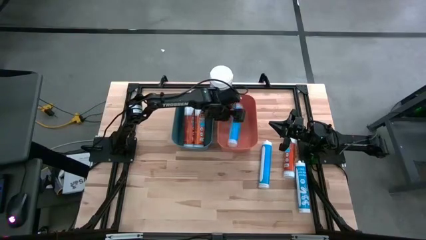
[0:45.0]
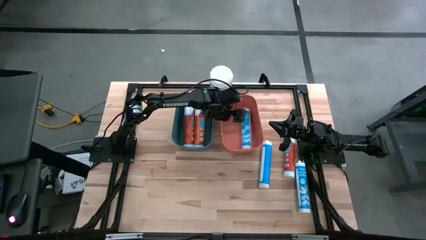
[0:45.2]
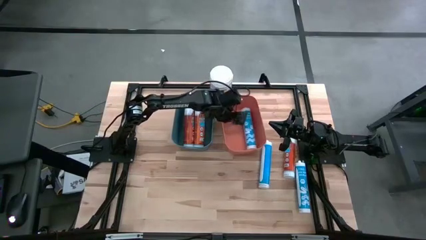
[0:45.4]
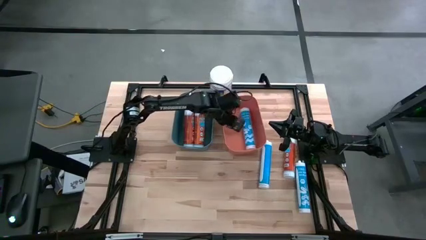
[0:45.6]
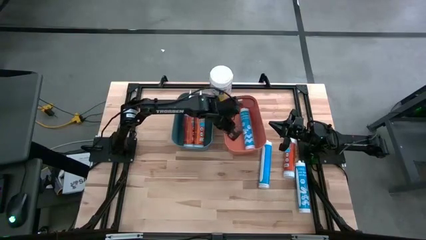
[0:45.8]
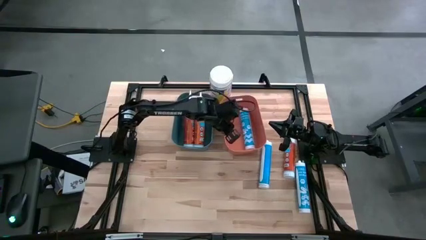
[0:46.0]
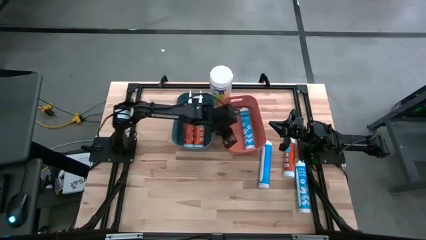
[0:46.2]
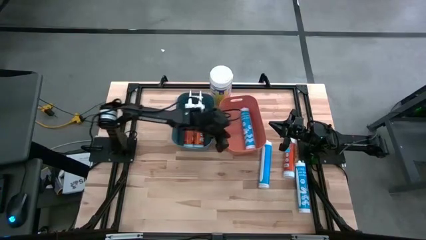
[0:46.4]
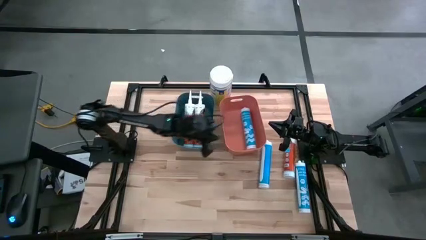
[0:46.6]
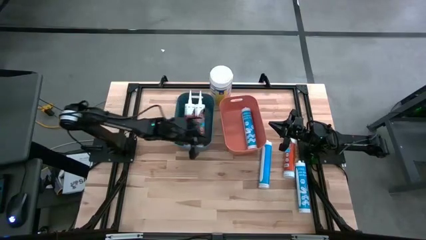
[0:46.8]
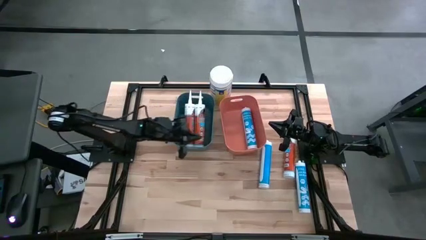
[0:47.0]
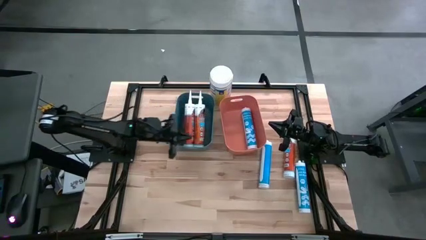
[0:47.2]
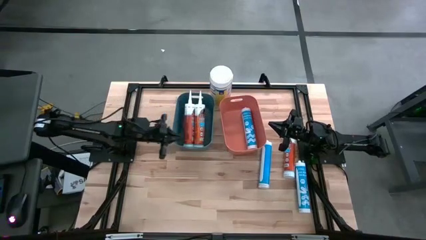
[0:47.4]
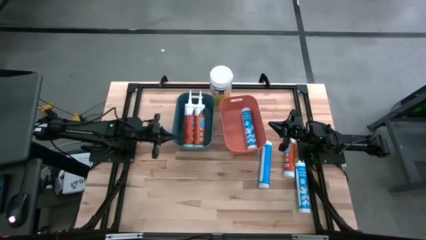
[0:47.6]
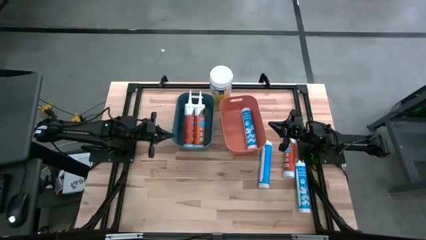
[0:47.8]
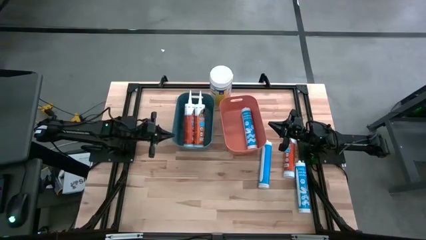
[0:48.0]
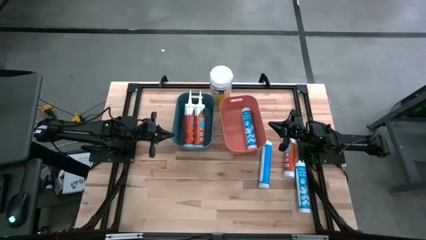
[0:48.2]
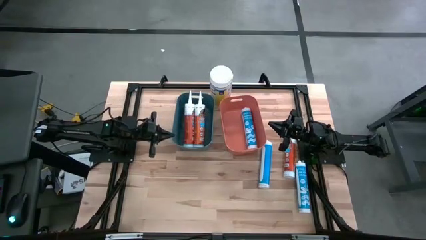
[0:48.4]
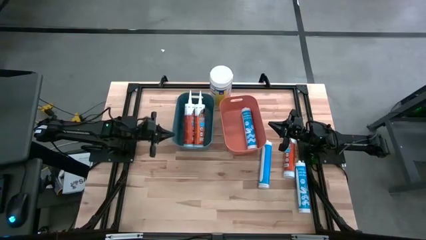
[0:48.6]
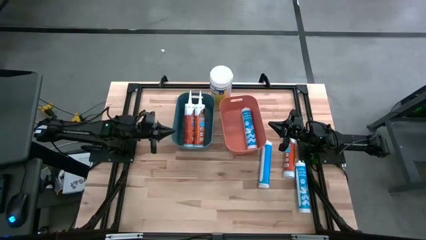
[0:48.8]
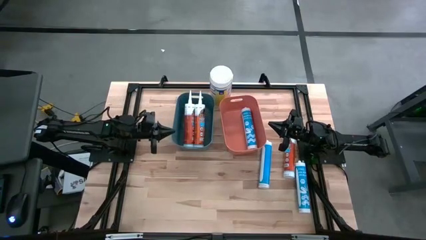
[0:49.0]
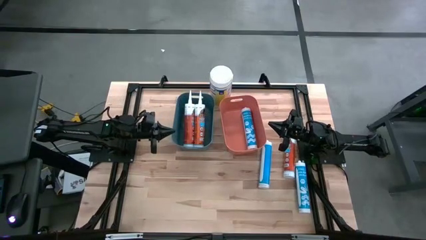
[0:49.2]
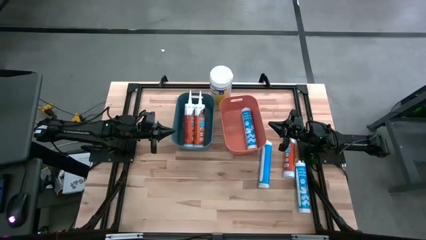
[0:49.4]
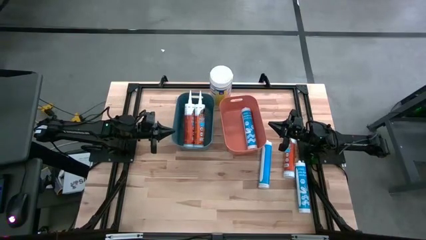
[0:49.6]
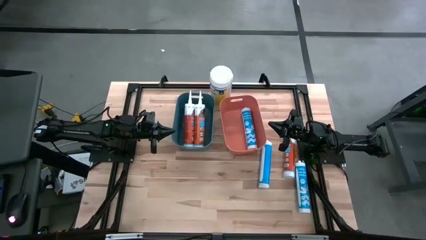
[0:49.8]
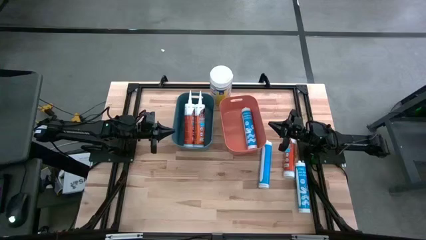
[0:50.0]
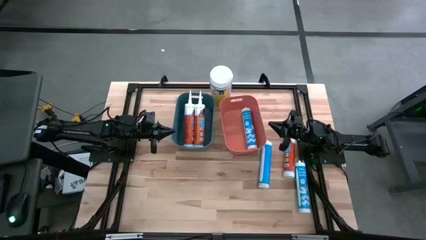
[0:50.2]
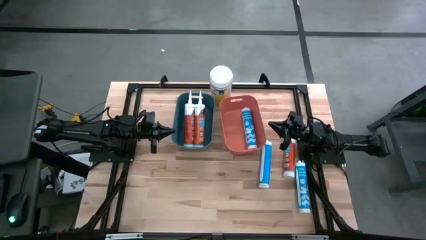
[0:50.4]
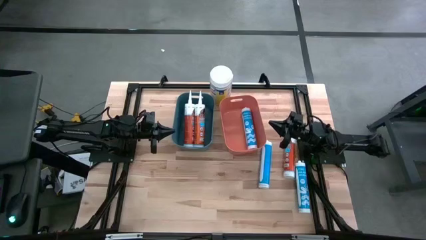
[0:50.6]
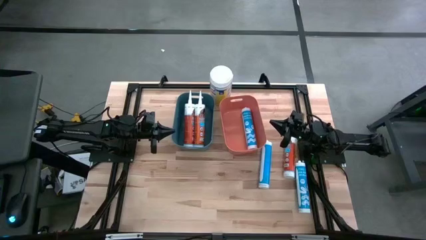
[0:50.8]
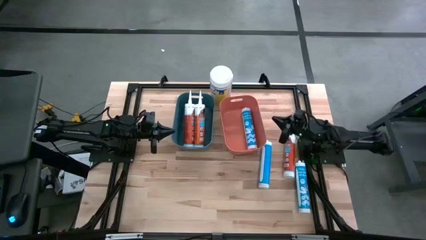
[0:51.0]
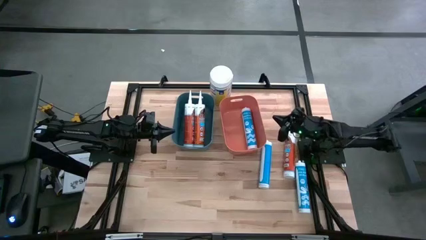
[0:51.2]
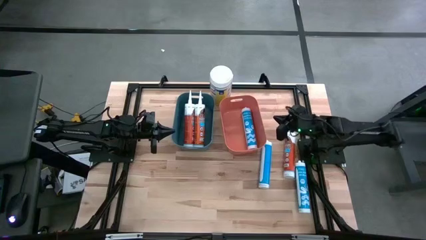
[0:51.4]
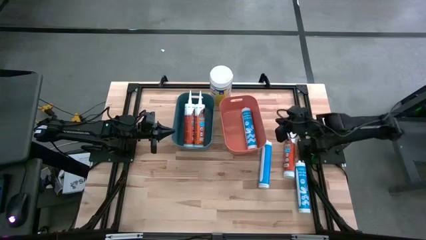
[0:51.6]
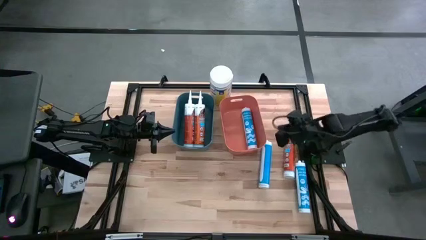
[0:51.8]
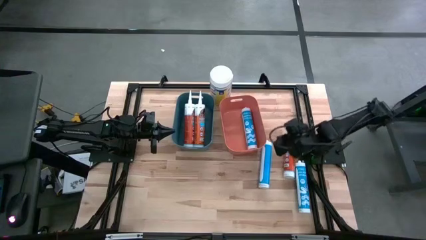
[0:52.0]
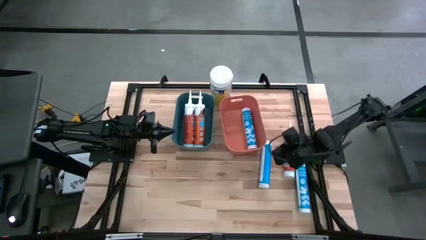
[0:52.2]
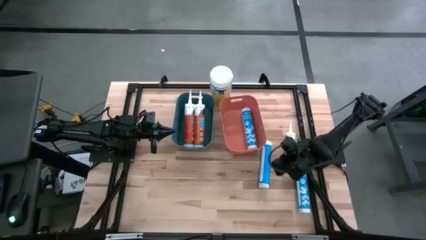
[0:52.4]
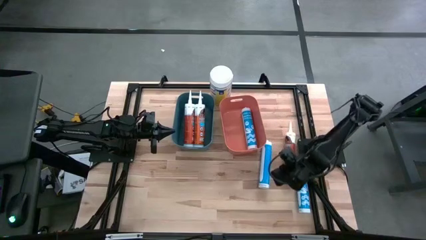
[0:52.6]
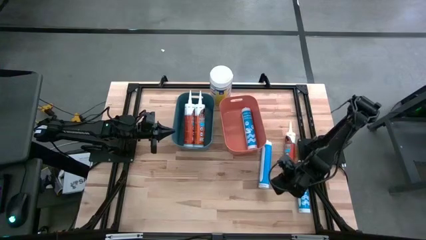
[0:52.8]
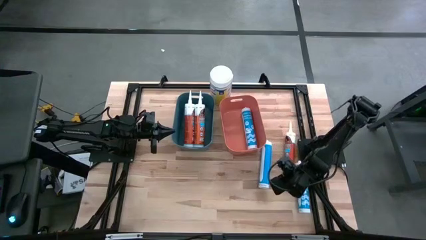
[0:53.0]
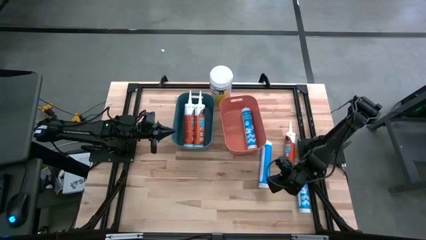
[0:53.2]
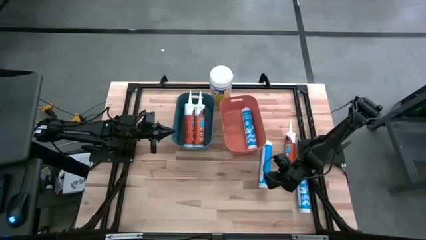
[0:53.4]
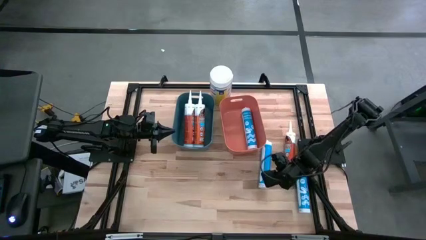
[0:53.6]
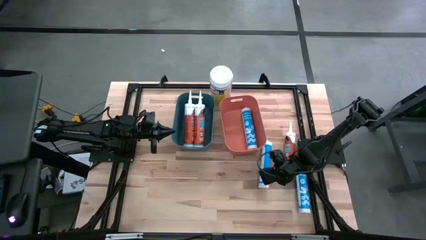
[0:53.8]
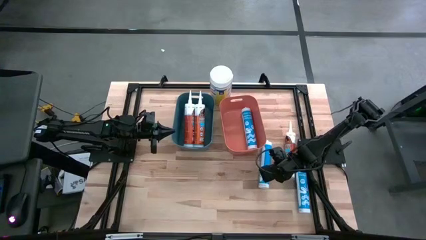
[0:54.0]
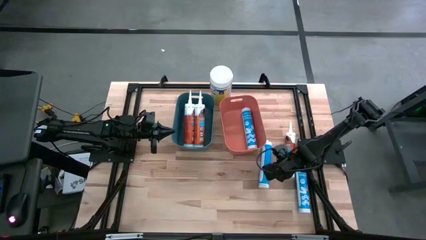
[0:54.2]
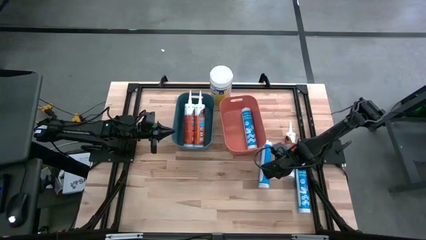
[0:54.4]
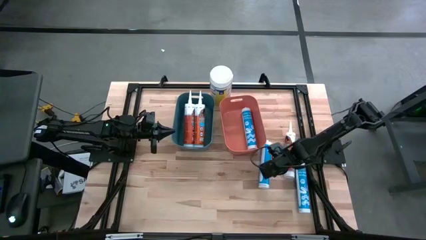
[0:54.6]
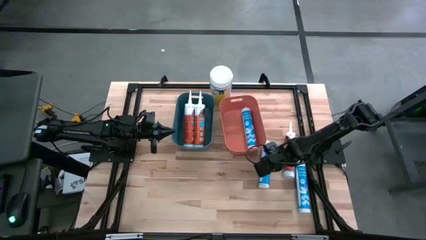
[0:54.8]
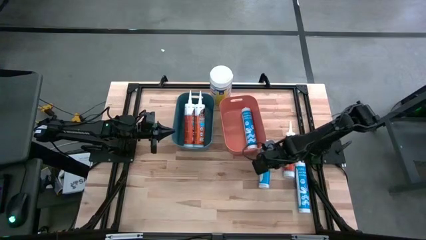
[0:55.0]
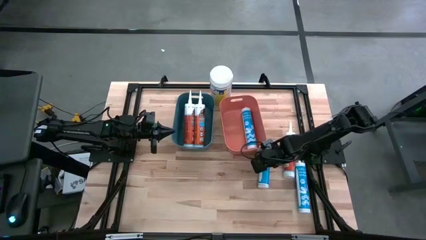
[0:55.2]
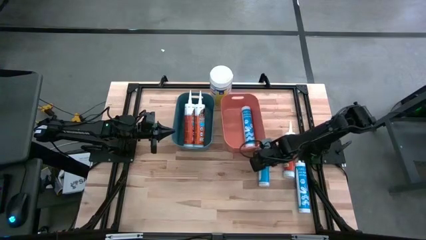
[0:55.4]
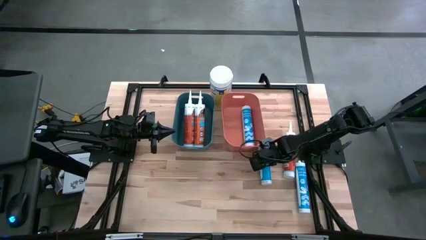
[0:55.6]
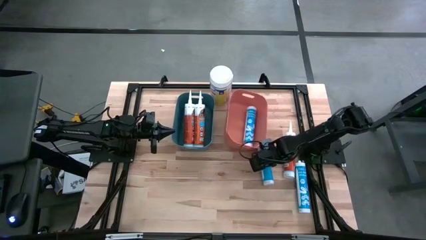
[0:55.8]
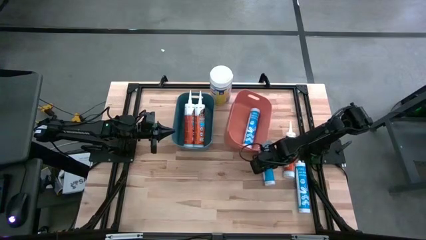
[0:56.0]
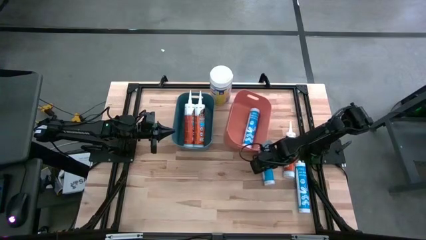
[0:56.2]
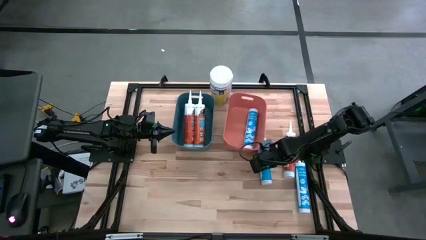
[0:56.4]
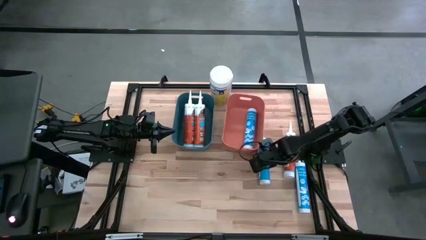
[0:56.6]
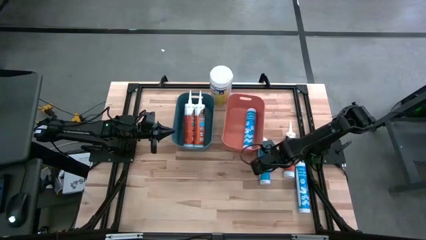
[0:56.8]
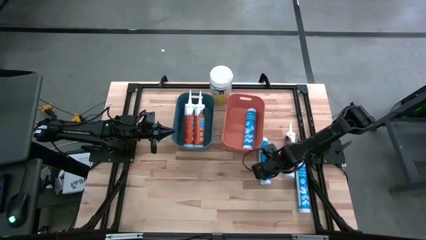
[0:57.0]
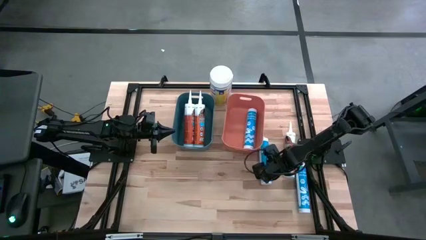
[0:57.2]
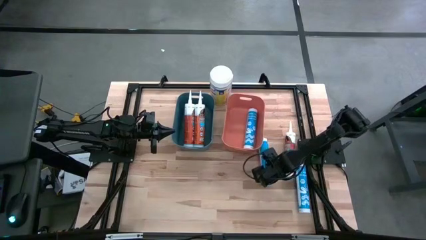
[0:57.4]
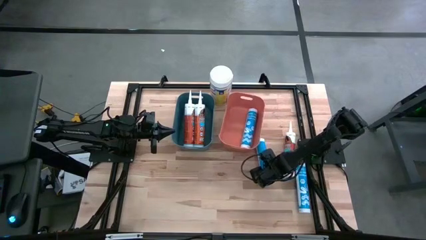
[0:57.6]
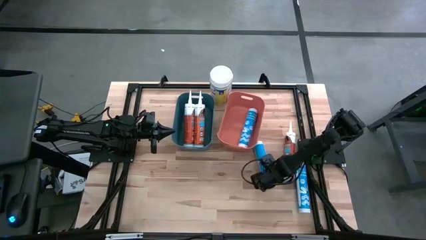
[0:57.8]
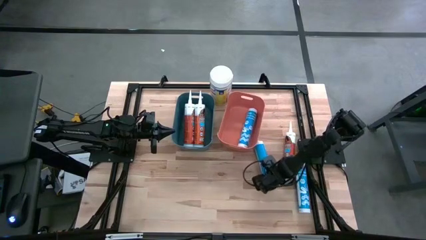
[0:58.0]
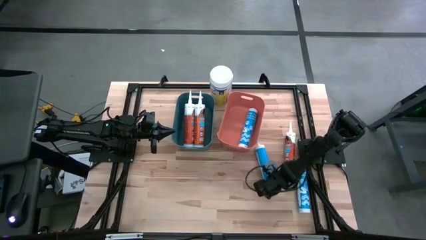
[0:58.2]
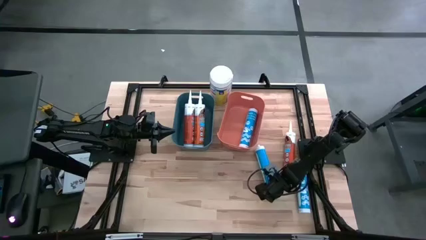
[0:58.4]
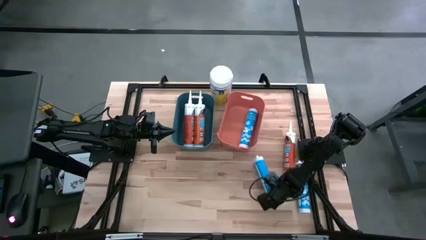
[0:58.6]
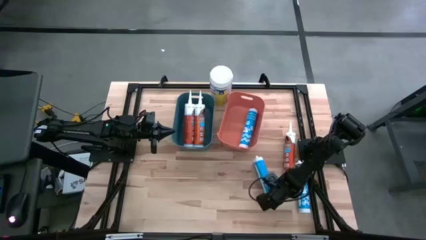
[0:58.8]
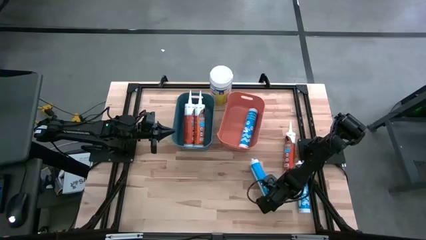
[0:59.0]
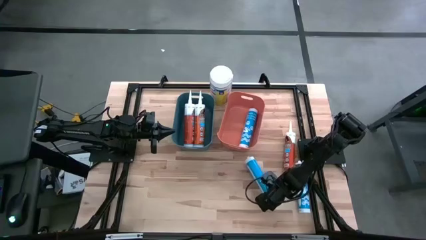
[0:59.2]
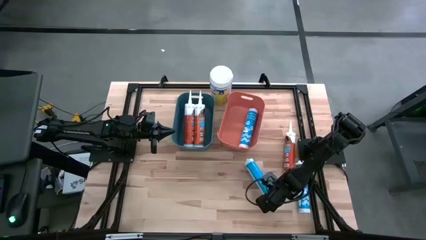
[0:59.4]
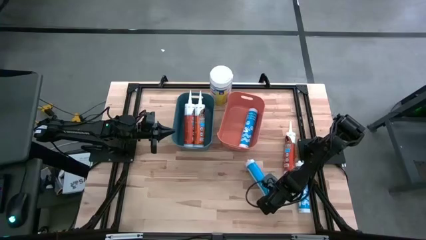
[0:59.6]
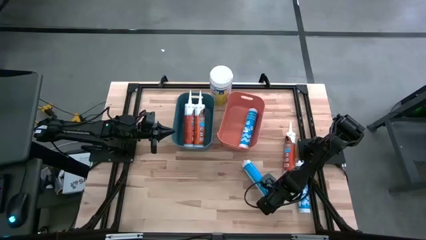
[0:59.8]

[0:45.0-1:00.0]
Task: Pick & place silicon tubes, Sealant and Lysol wipes
Put the top blue sealant into the orange bin

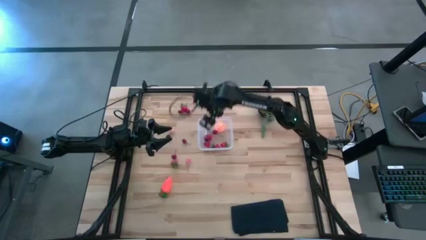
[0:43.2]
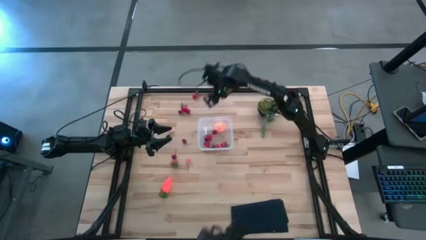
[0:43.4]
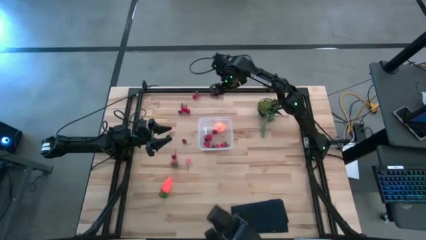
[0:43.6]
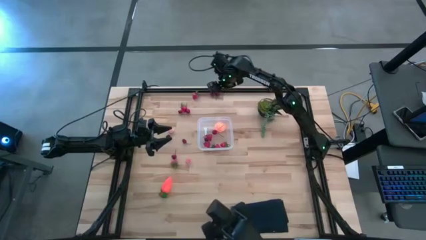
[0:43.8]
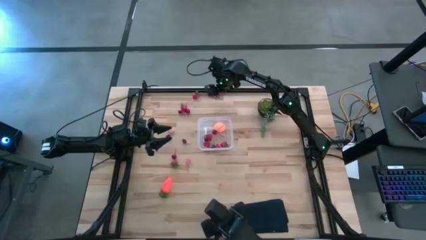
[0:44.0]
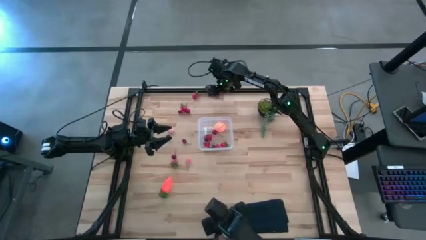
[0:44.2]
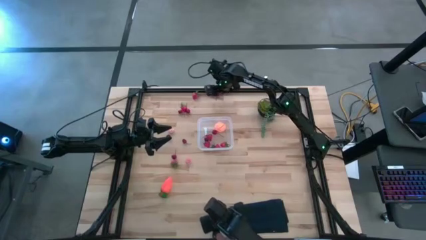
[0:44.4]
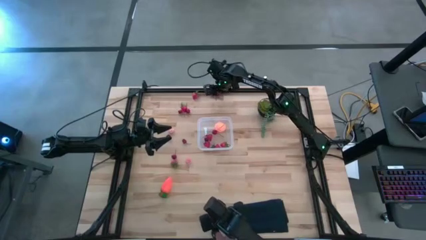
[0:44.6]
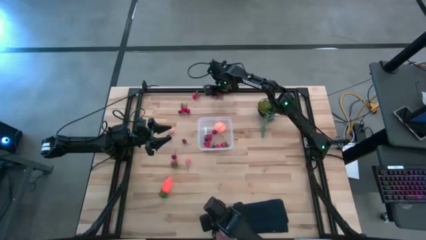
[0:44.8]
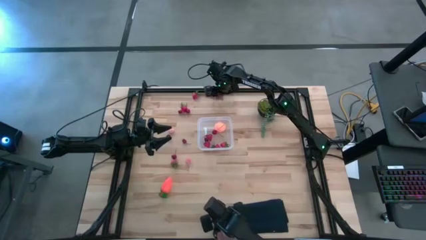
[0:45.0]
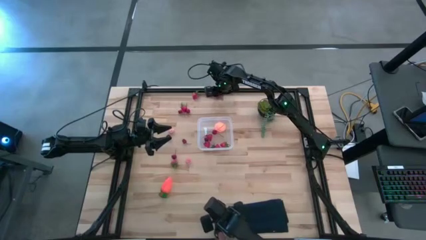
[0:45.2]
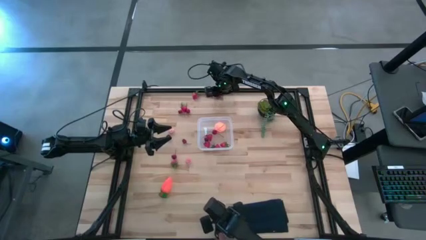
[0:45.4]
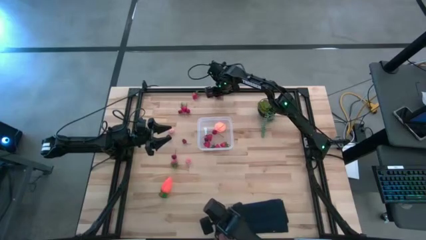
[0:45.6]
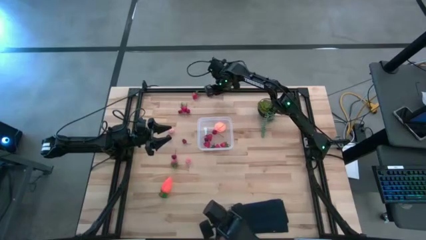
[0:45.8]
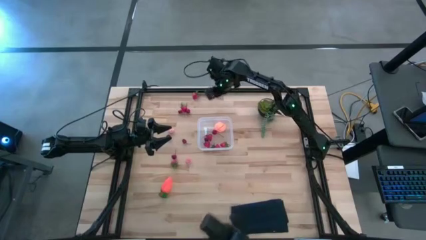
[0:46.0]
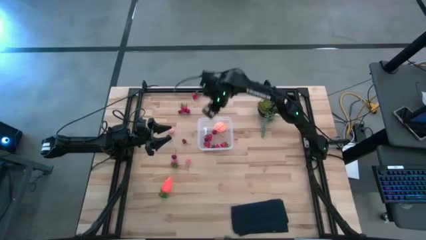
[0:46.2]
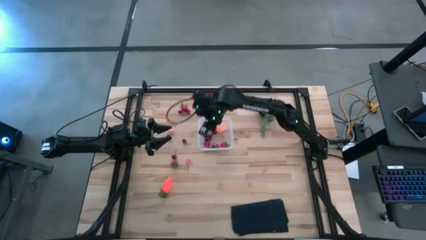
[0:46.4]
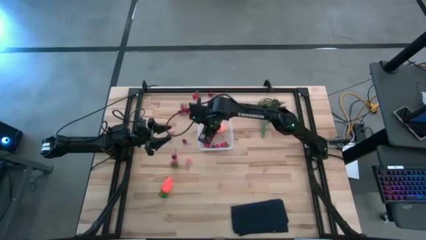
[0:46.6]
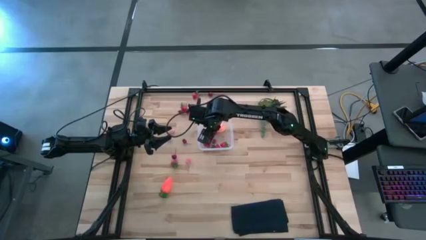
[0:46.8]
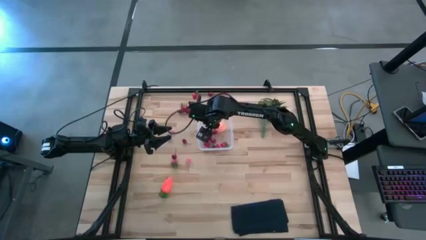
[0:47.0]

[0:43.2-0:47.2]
Task: Pick and placing Produce into tupperware
Put the red cherry into the transparent bin
